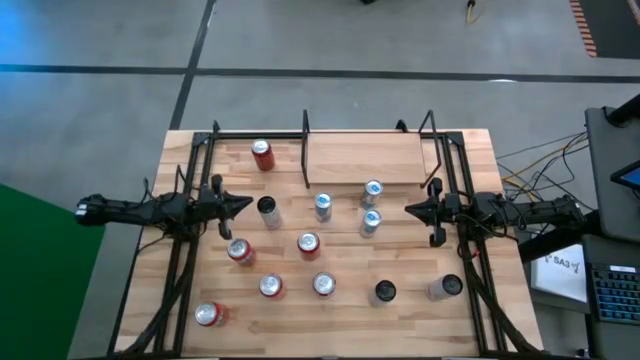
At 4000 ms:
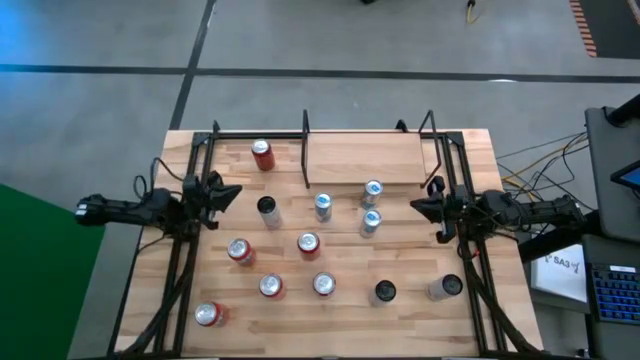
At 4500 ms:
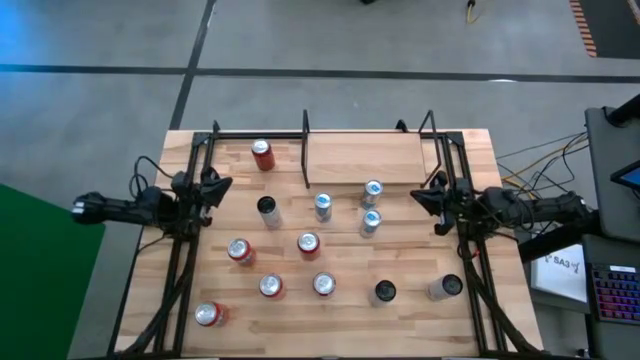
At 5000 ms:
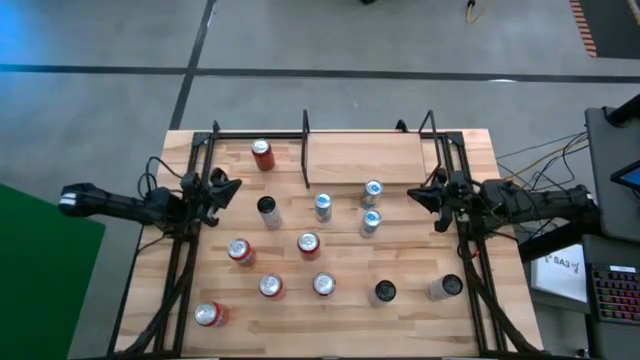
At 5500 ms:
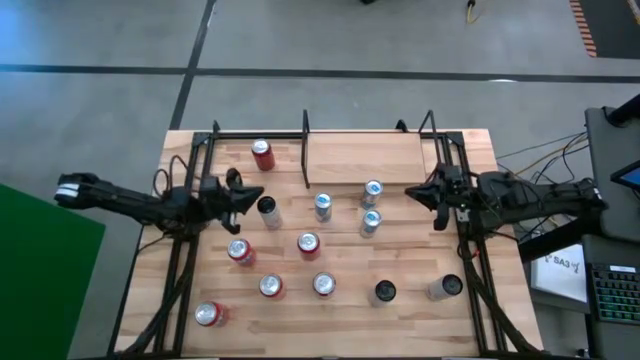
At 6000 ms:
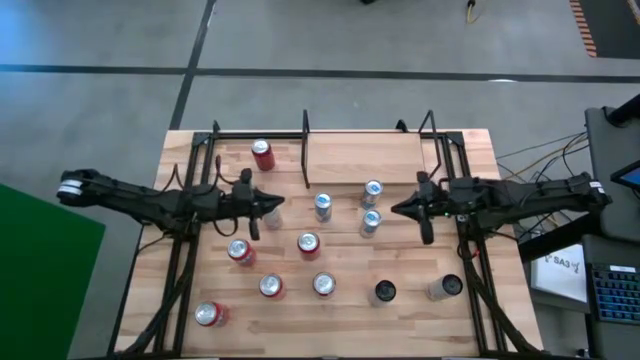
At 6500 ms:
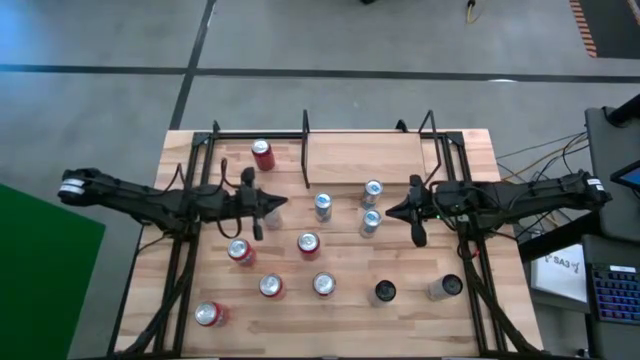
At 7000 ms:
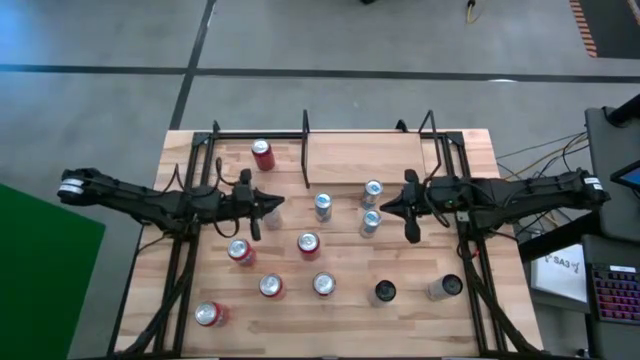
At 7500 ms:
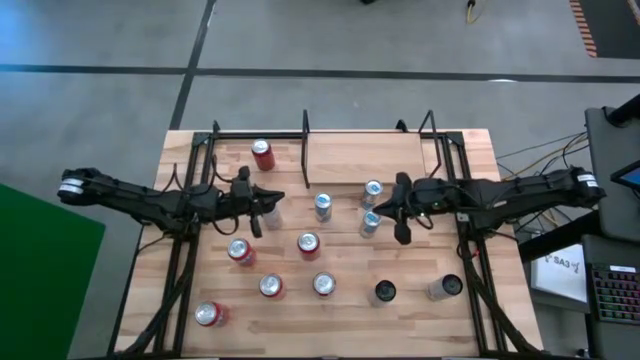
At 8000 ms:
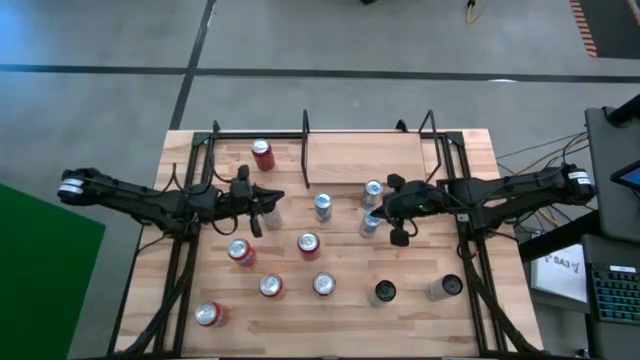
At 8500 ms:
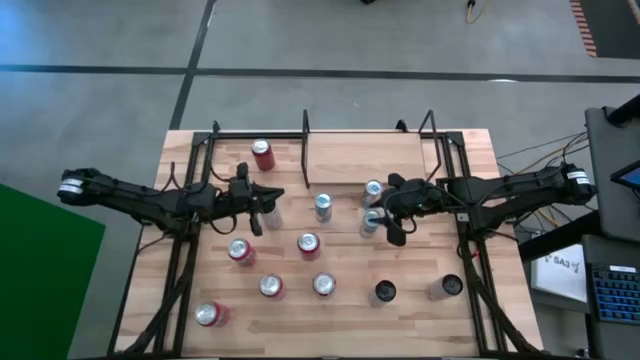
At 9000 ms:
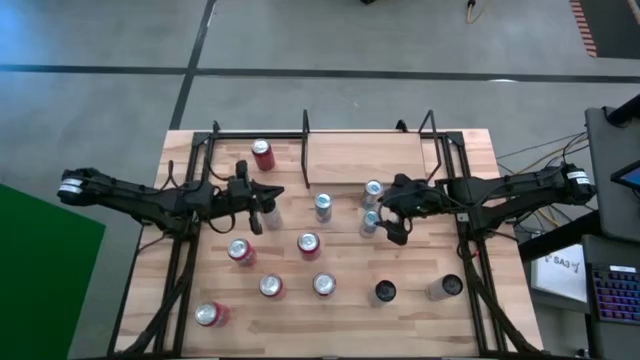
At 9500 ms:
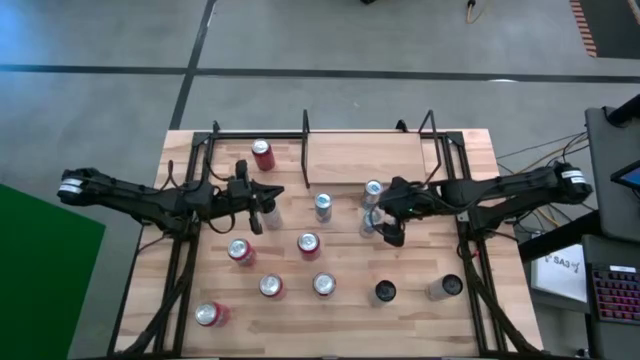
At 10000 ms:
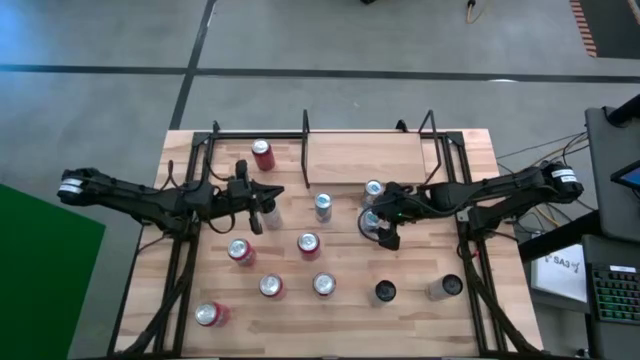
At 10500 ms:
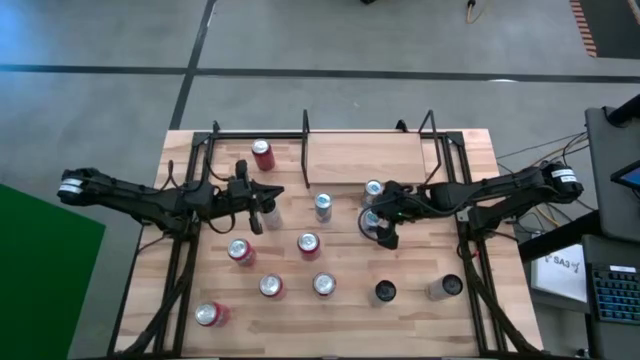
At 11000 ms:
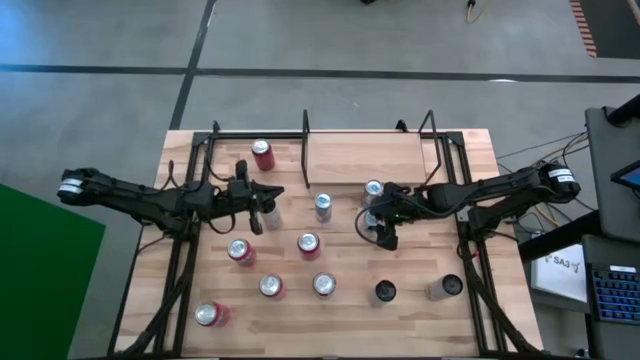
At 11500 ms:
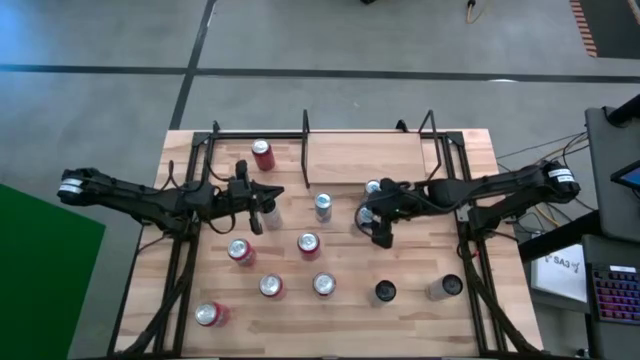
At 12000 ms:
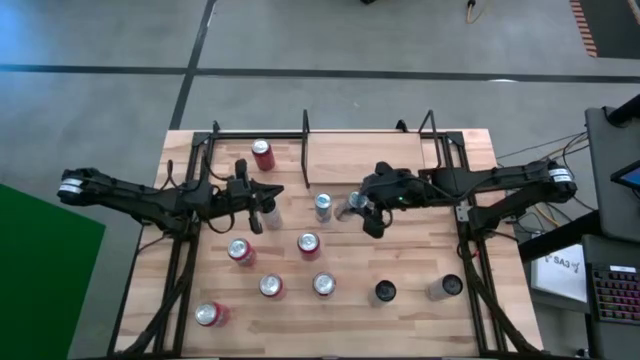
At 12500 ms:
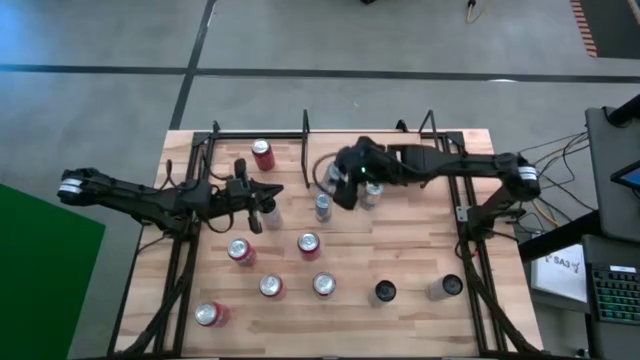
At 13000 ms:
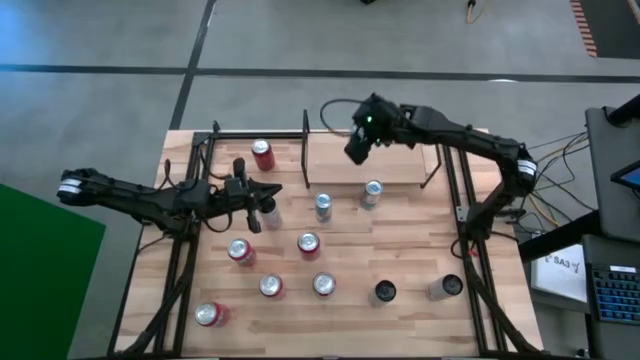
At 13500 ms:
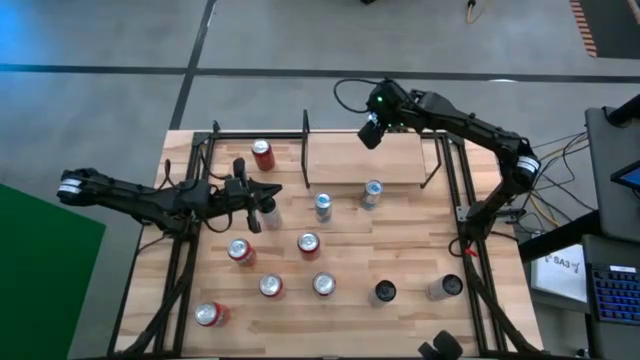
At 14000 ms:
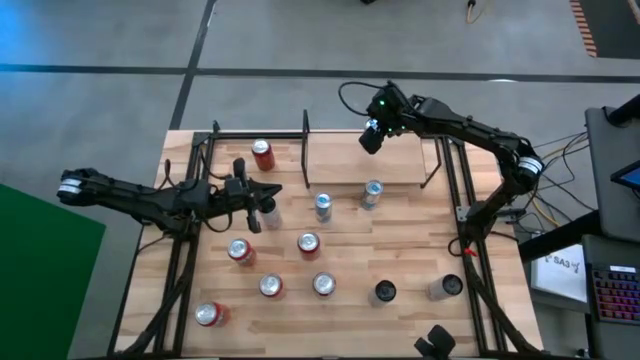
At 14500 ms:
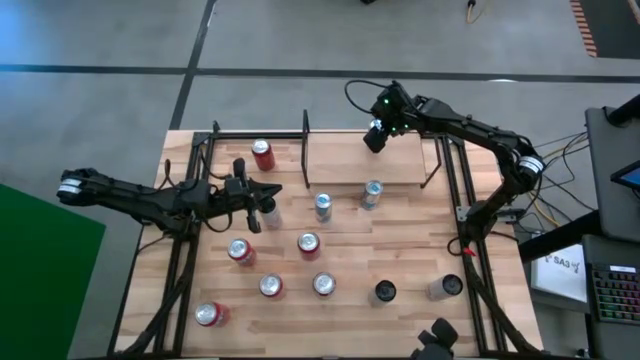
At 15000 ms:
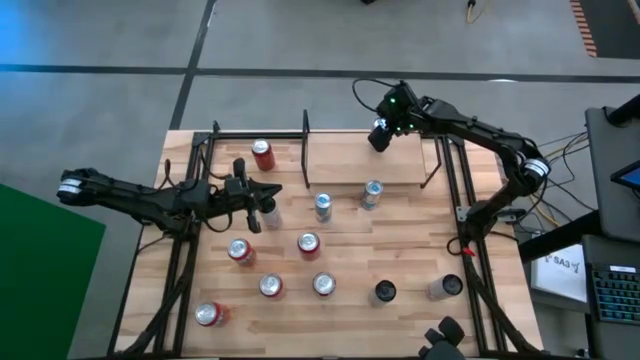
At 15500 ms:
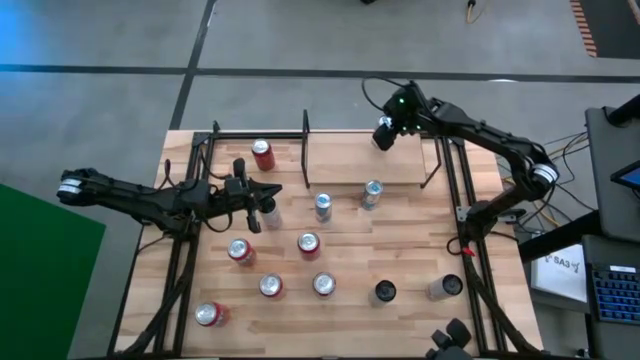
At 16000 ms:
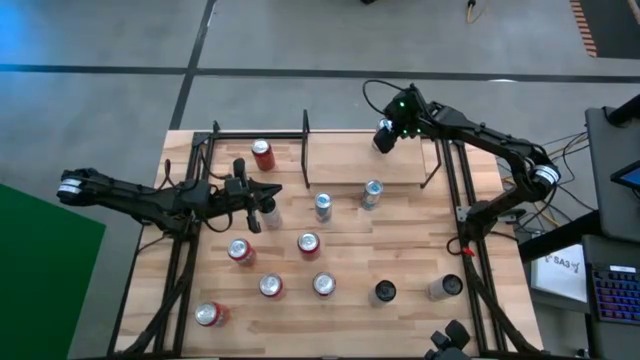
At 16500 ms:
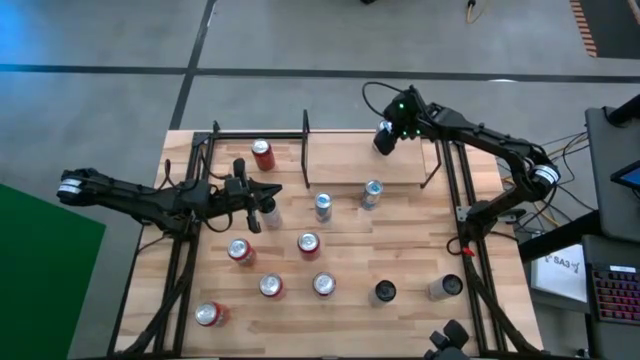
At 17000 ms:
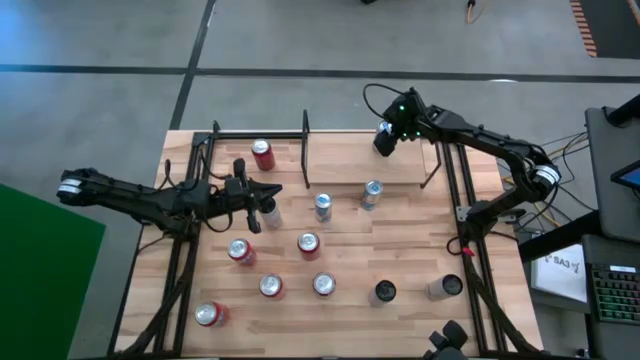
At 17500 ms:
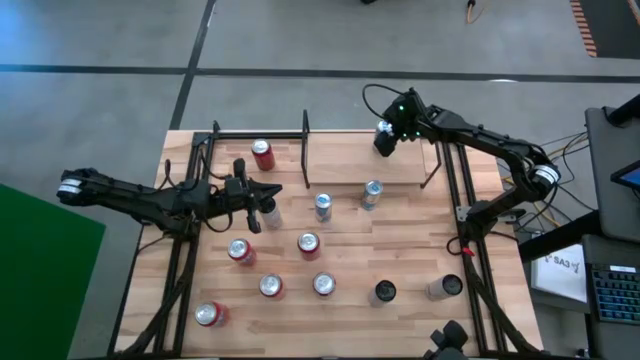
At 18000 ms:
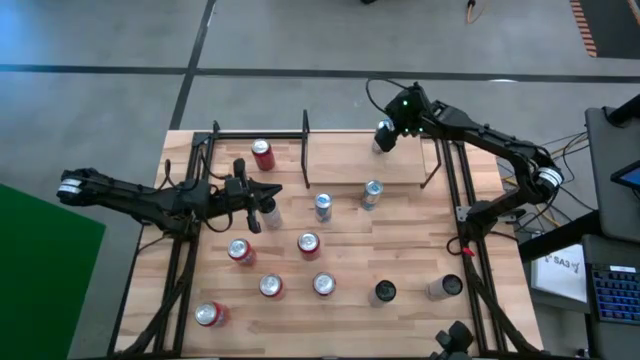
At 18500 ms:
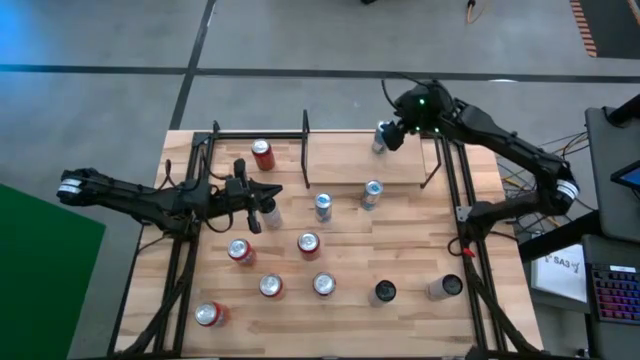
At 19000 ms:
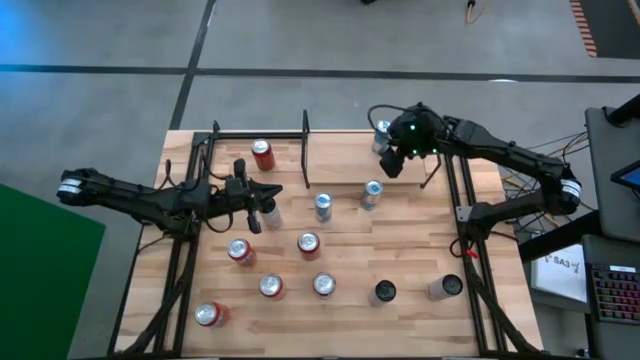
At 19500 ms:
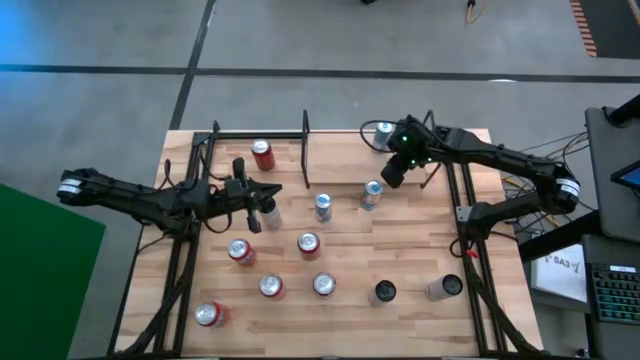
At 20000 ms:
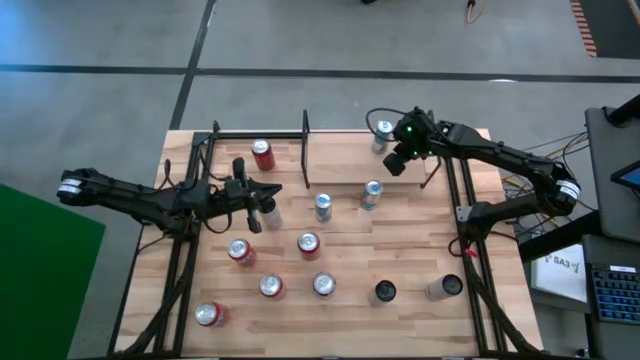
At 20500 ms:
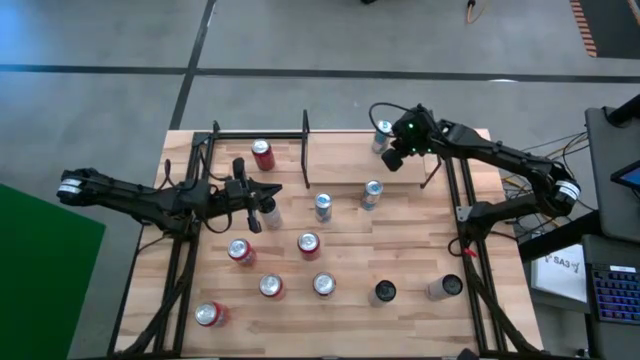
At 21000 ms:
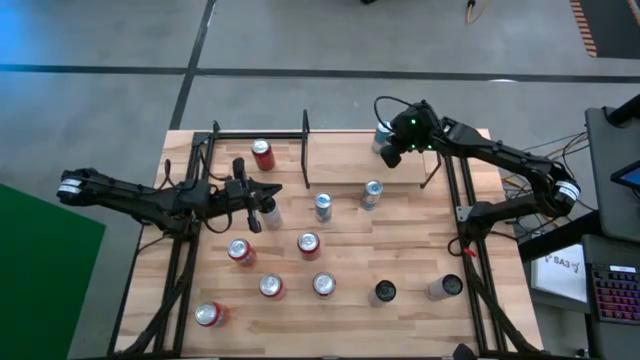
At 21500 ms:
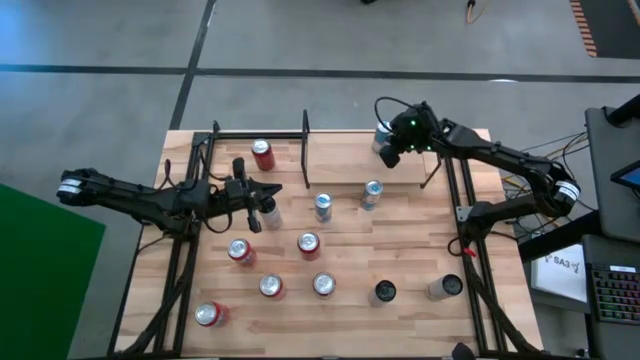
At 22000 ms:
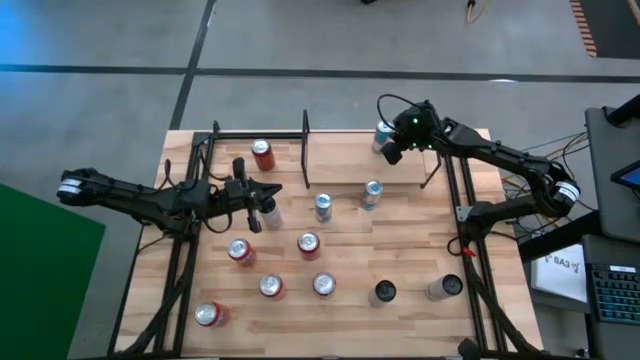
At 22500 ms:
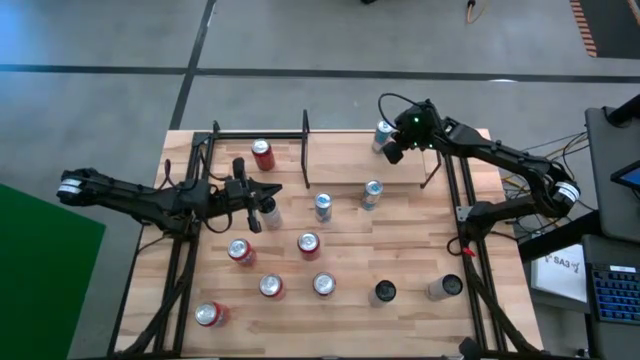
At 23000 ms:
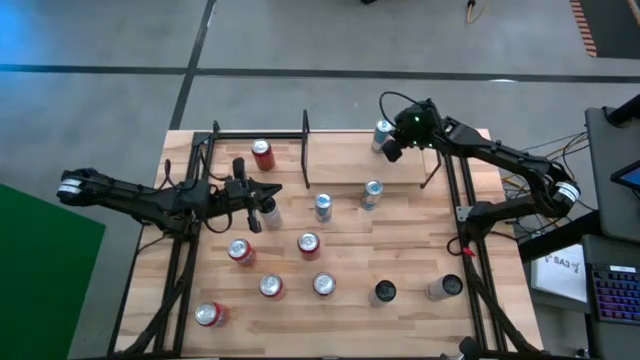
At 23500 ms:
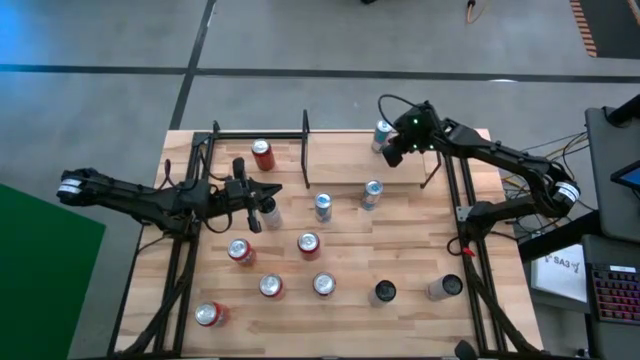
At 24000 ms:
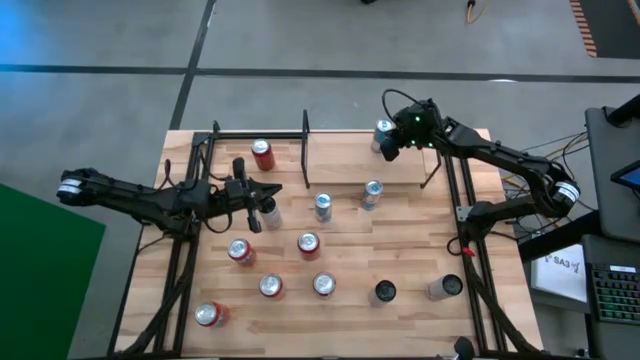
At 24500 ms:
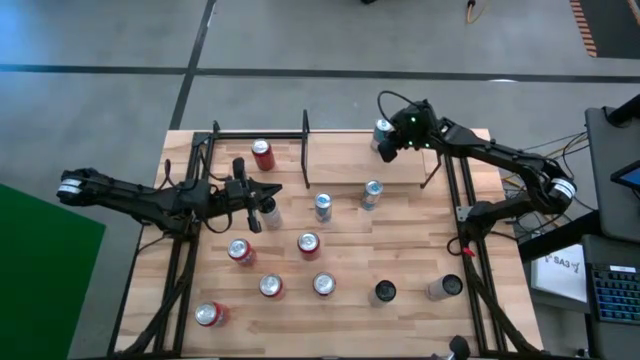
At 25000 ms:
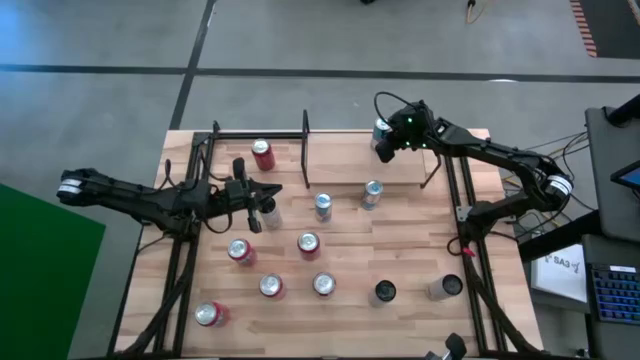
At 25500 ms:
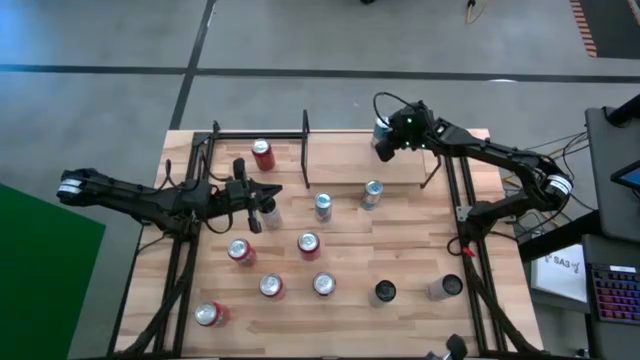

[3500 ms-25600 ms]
Task: Place canned beverage on shelf
Put the white and blue soda can on the shelf
